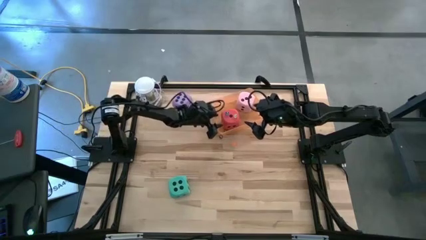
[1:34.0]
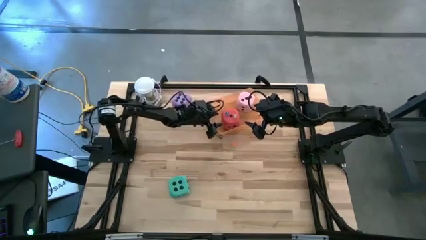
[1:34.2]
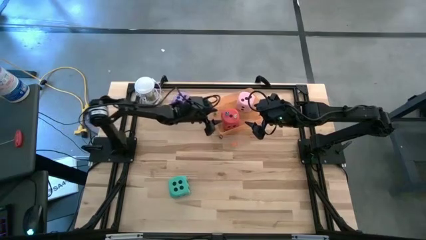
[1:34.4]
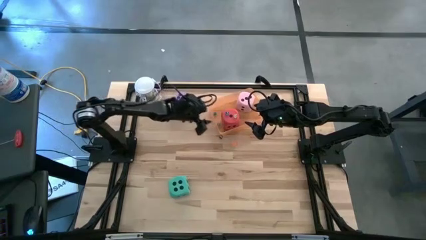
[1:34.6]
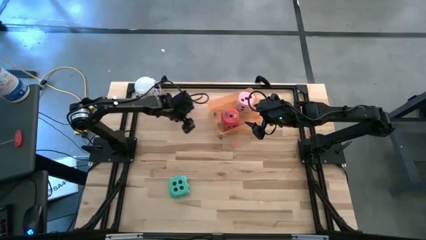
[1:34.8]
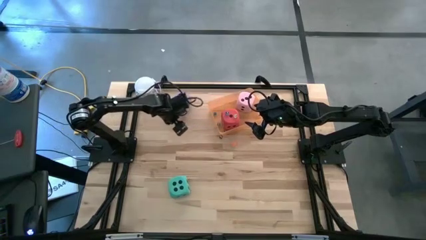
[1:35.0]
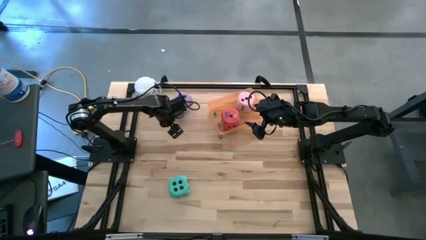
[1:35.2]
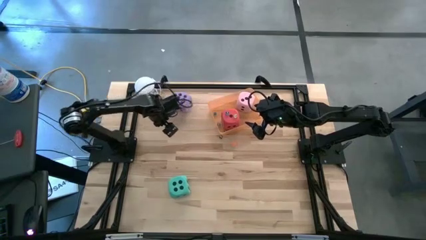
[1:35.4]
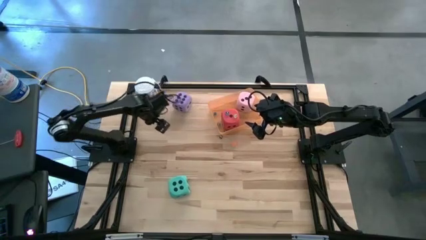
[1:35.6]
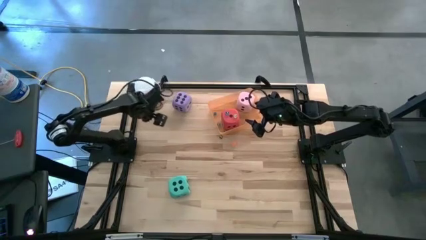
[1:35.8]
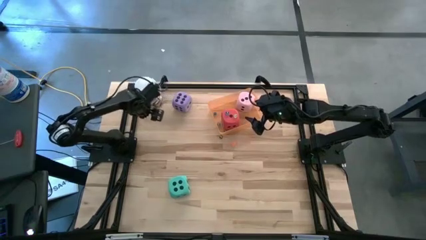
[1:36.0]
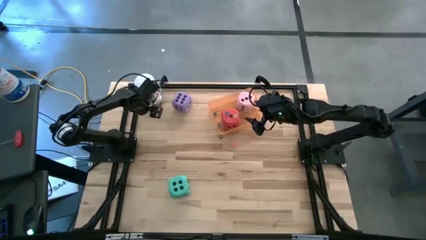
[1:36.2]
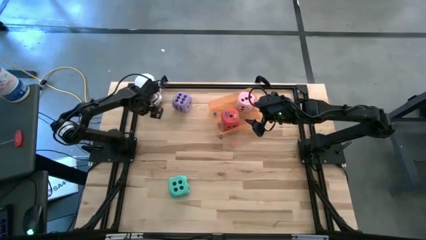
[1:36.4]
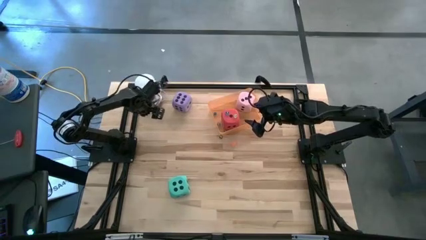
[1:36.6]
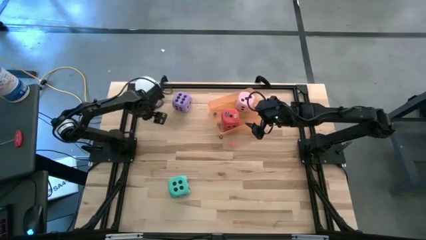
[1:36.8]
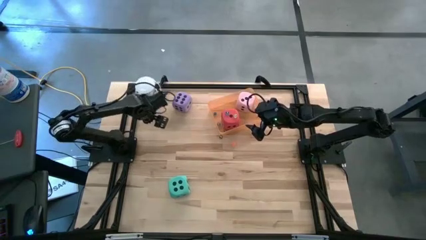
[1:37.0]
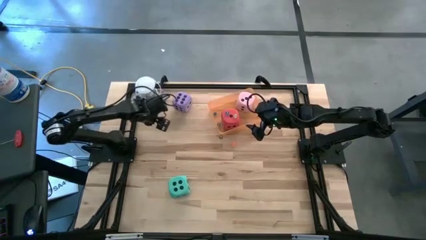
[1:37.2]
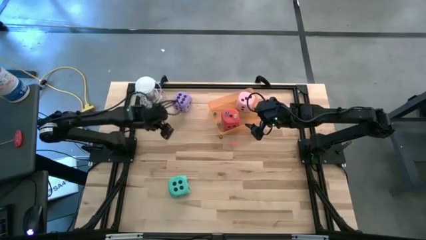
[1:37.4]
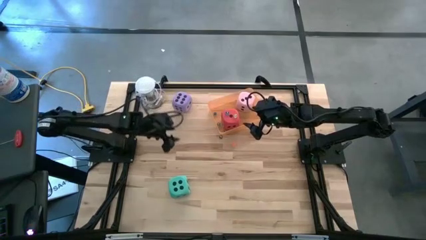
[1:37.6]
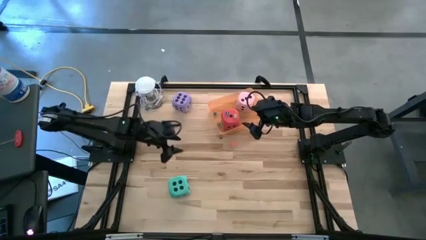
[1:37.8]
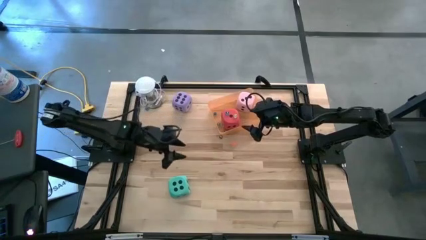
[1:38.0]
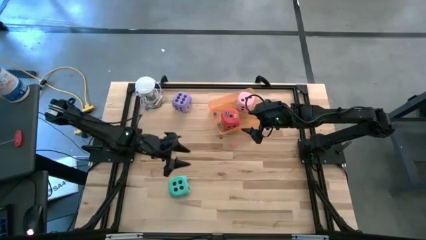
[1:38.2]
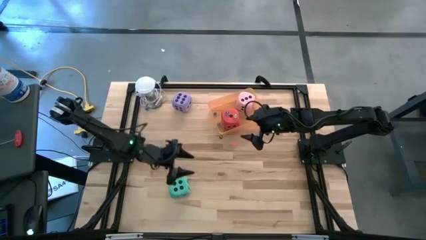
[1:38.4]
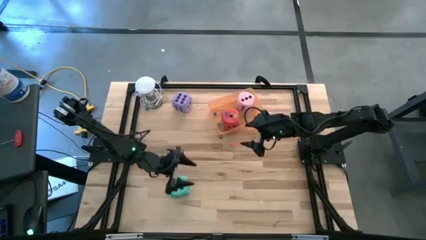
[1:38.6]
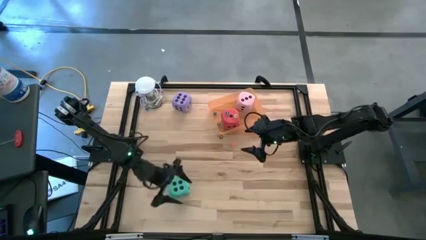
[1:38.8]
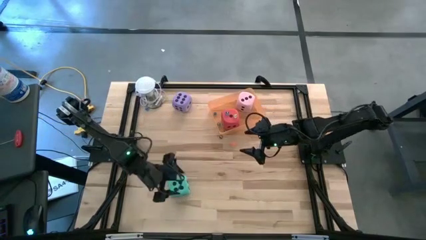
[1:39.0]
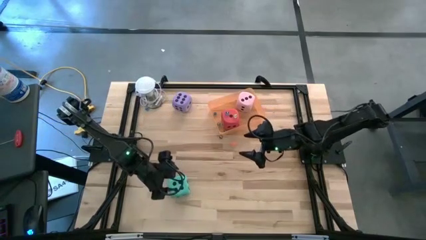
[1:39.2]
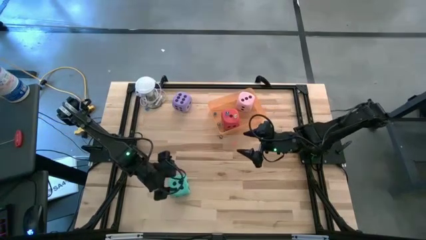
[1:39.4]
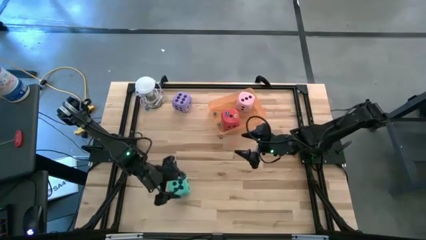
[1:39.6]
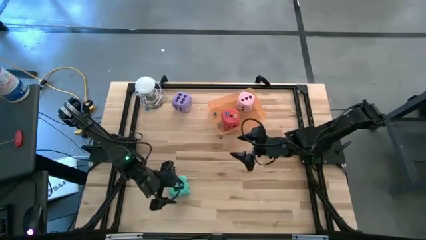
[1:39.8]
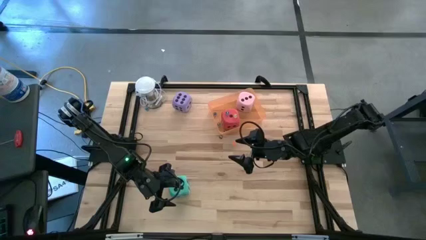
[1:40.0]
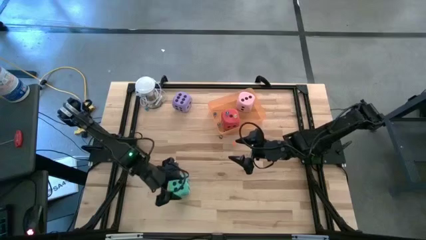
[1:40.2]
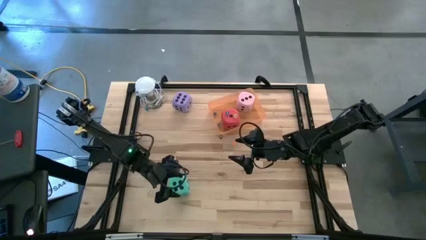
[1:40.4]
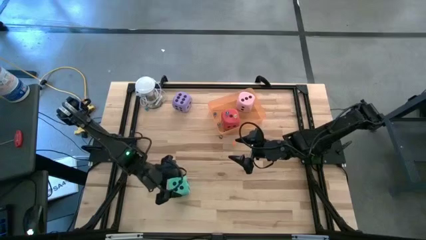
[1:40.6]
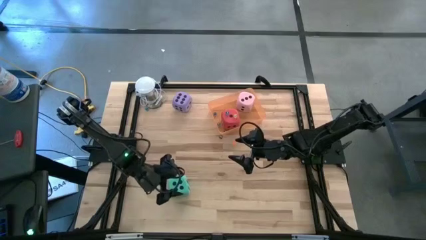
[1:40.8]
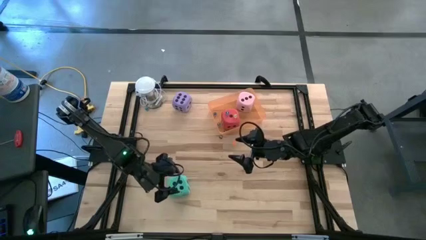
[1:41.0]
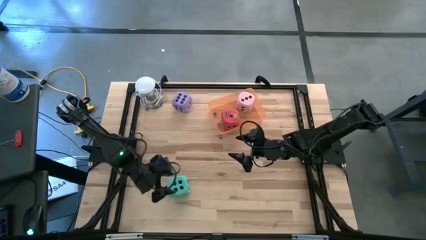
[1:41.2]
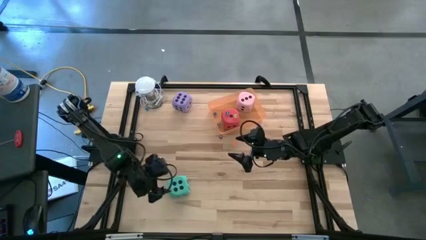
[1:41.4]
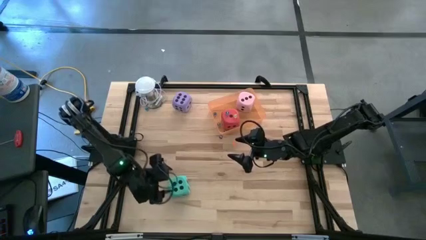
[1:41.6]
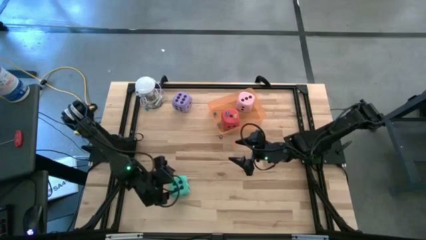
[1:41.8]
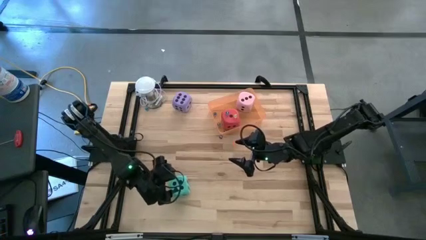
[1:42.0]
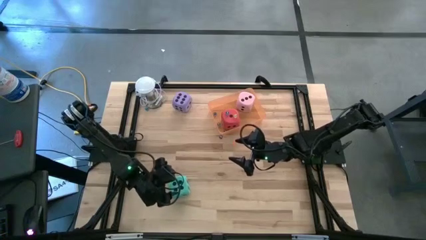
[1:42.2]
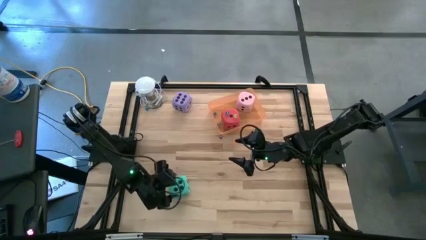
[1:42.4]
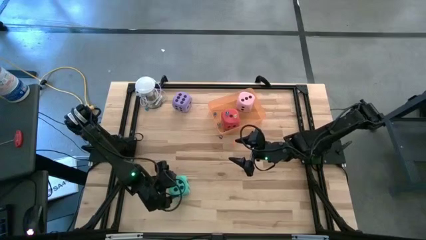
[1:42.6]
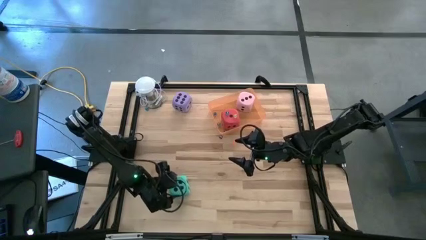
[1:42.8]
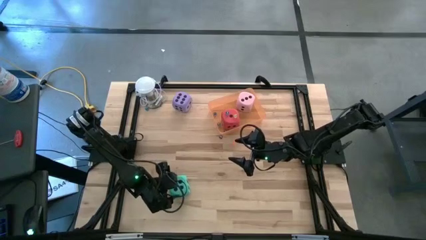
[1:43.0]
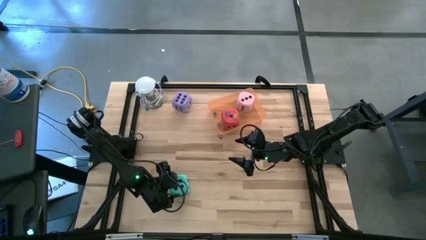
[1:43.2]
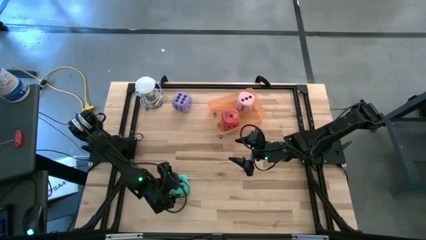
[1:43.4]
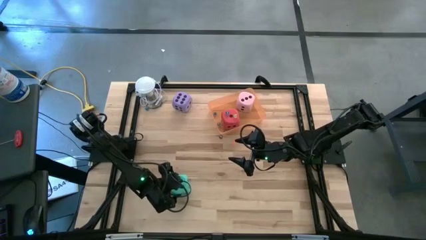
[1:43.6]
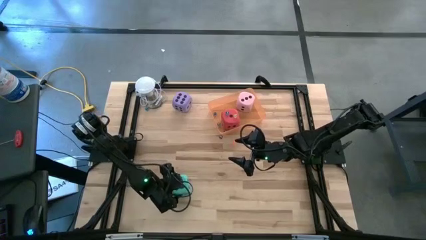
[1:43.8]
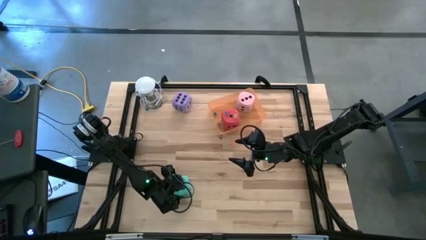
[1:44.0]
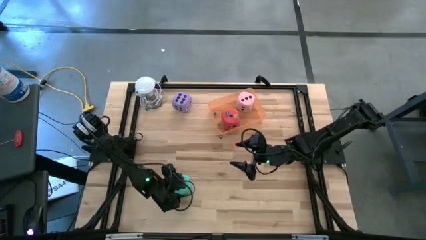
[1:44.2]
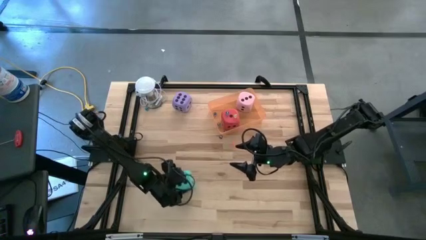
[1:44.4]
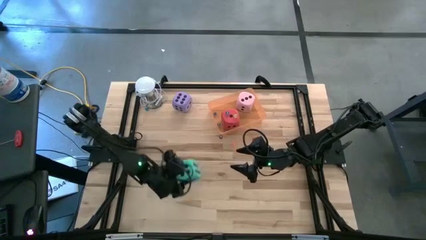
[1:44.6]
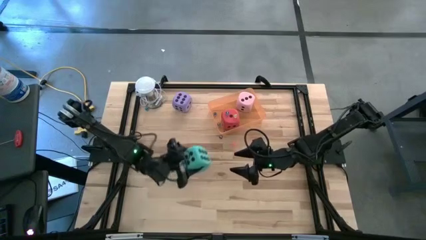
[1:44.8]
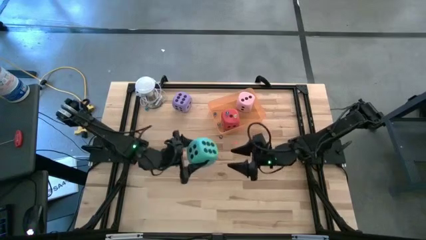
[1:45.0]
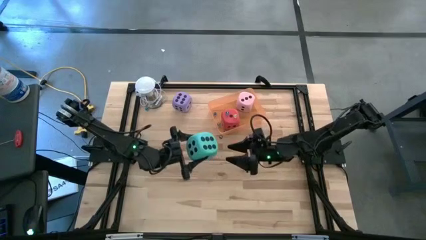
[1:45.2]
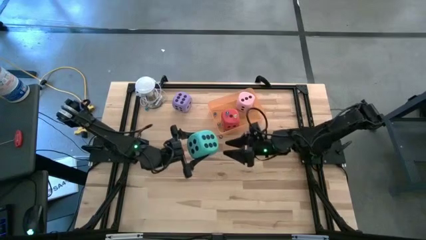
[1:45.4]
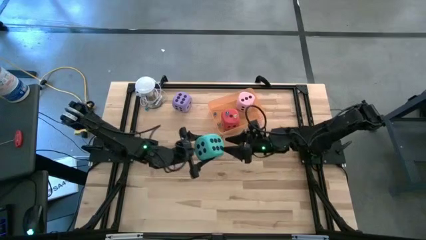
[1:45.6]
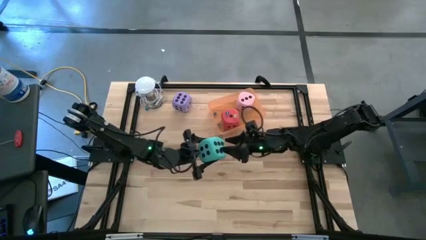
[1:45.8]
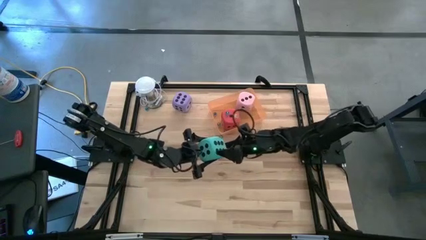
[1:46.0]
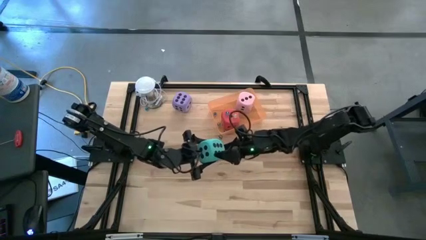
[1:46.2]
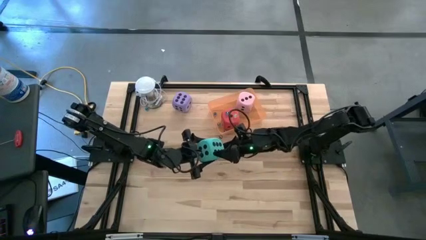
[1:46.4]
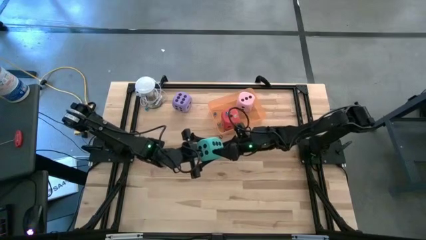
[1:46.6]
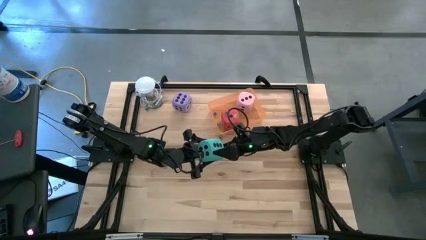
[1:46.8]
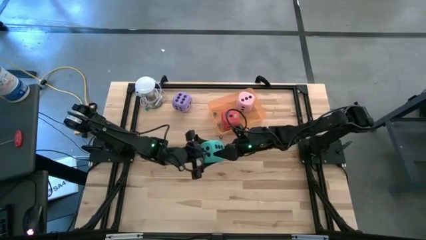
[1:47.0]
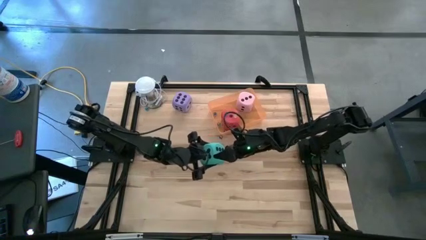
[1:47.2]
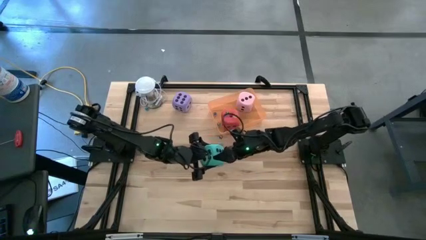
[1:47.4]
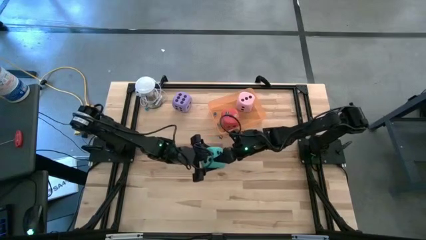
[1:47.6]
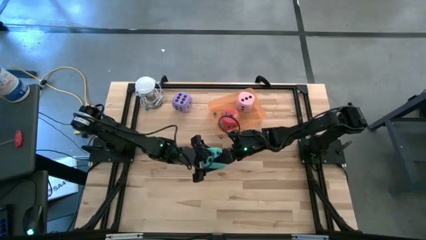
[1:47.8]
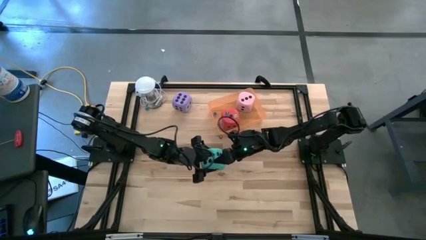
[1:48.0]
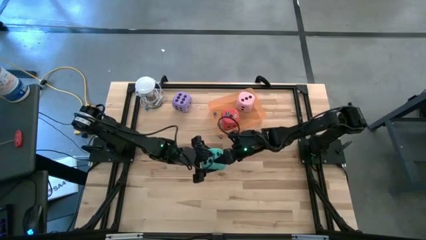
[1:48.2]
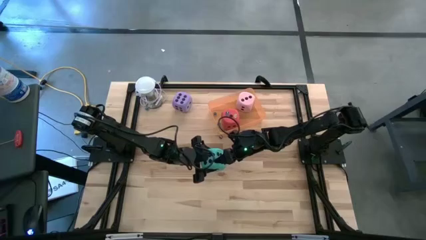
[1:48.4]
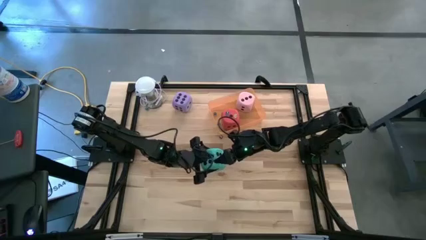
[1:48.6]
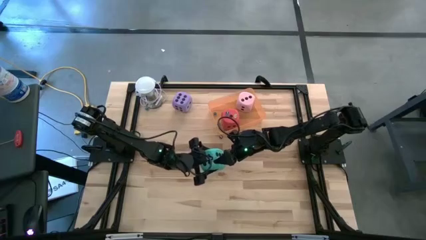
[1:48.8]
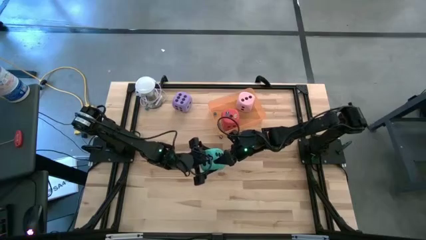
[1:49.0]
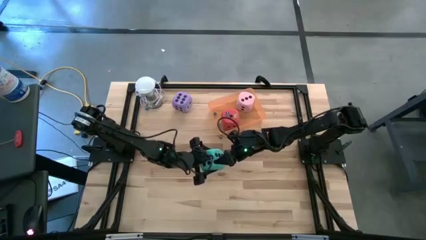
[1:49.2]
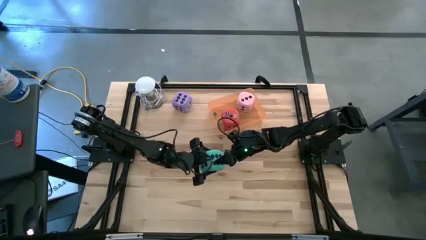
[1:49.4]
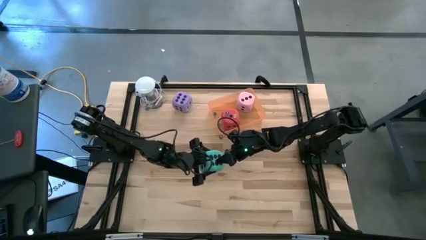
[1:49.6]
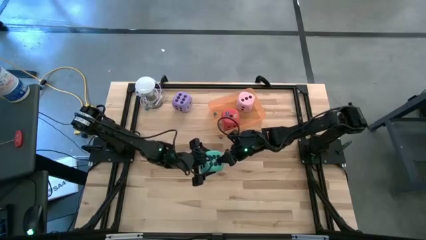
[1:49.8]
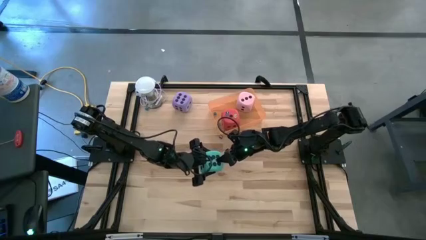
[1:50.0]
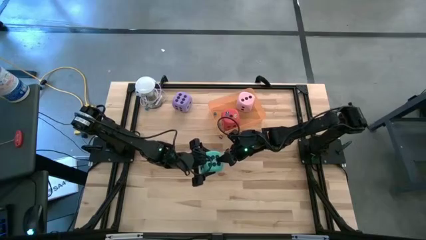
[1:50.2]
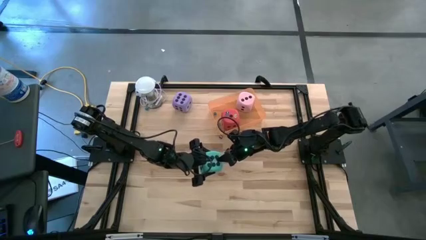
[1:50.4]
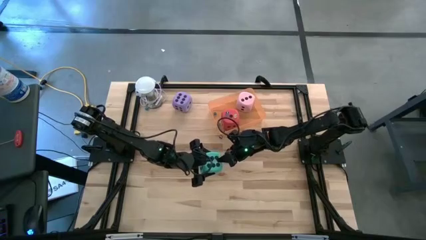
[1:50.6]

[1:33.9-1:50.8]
Task: Pick & Place Dice
Put the large light blue dice into the orange bin
